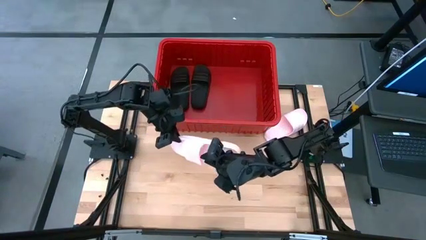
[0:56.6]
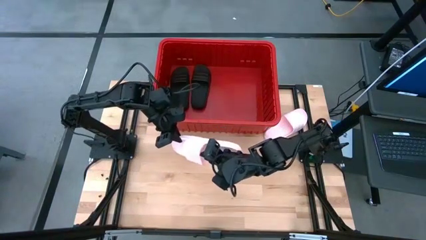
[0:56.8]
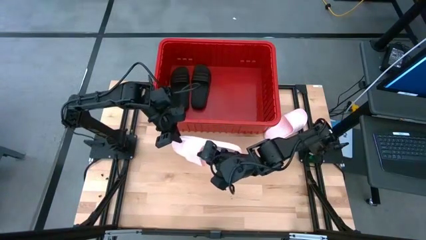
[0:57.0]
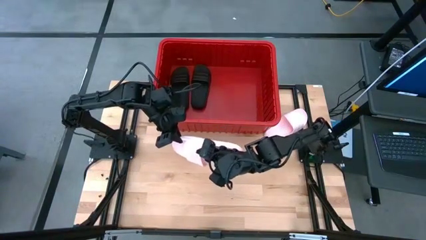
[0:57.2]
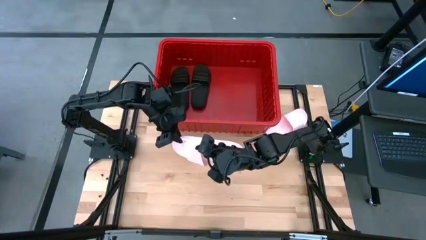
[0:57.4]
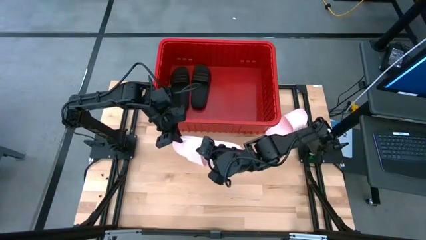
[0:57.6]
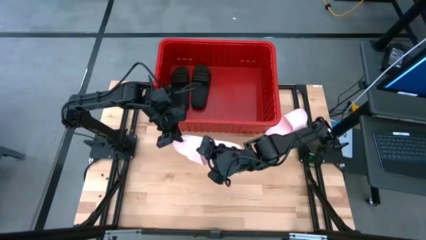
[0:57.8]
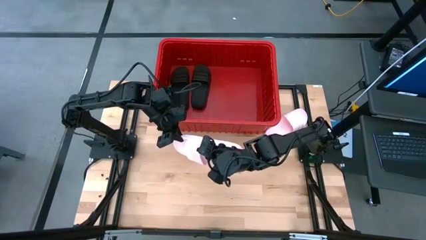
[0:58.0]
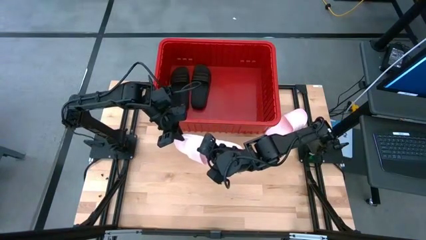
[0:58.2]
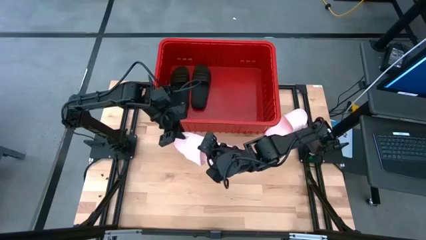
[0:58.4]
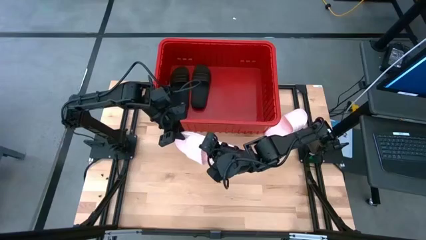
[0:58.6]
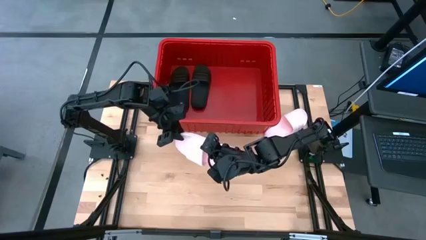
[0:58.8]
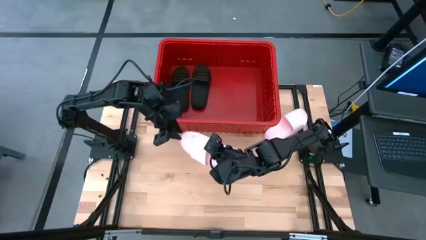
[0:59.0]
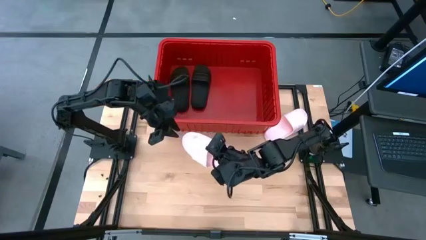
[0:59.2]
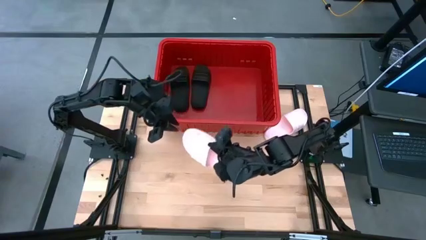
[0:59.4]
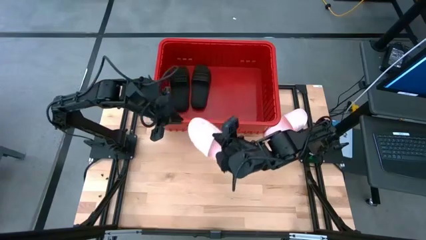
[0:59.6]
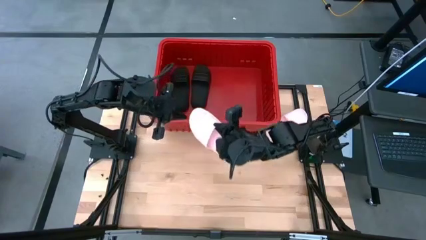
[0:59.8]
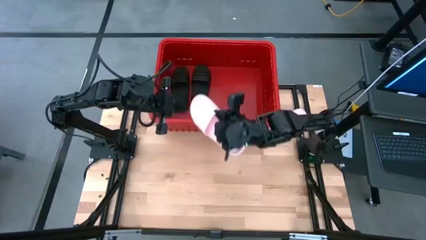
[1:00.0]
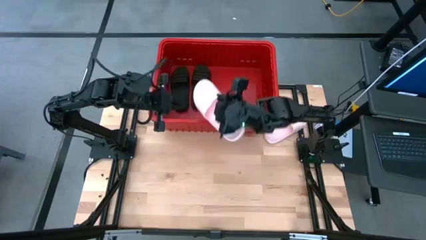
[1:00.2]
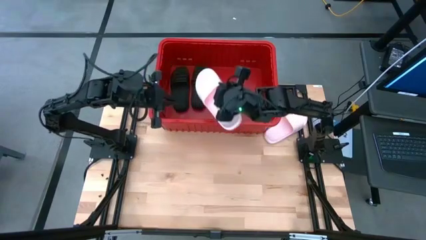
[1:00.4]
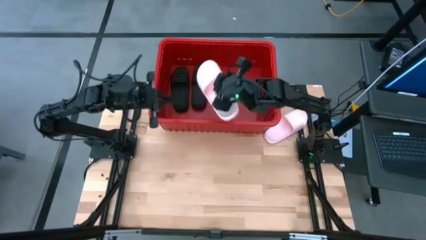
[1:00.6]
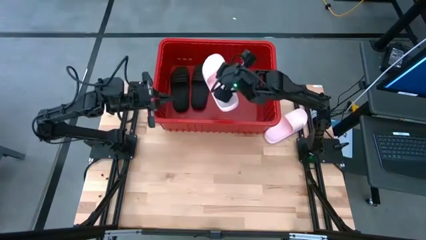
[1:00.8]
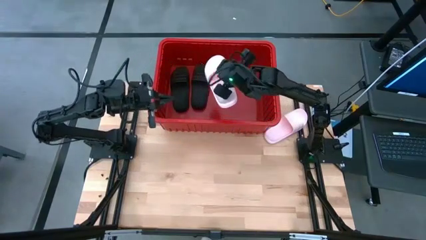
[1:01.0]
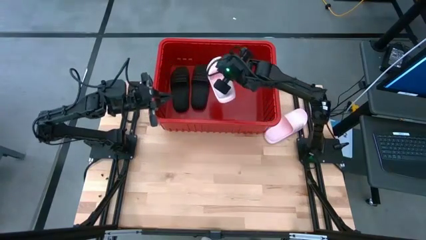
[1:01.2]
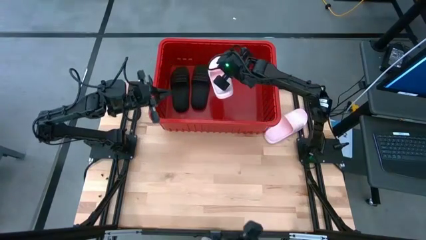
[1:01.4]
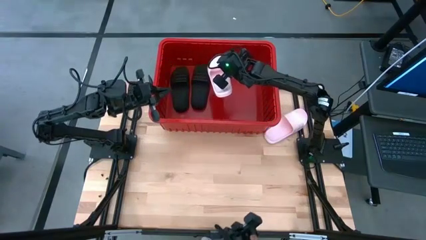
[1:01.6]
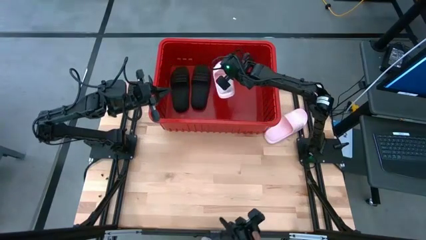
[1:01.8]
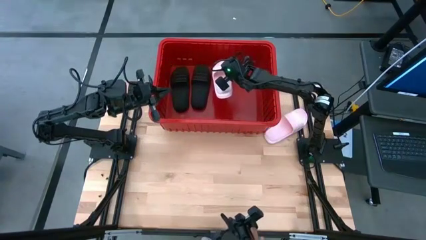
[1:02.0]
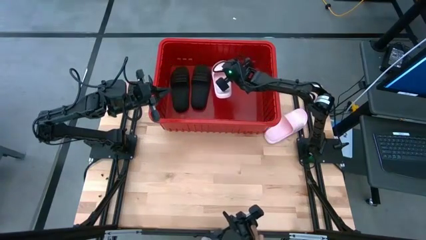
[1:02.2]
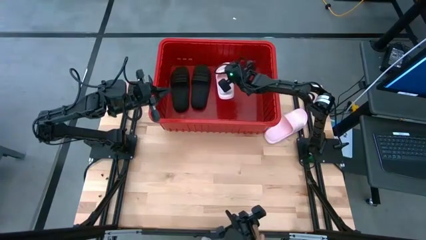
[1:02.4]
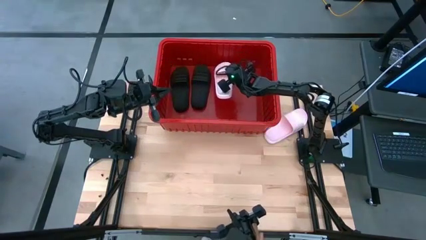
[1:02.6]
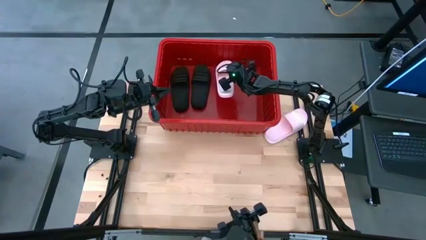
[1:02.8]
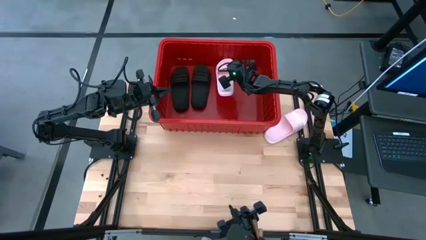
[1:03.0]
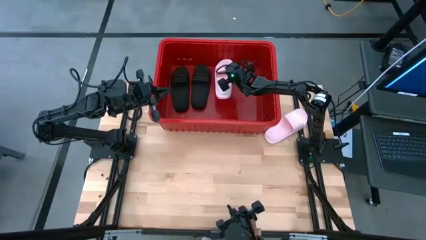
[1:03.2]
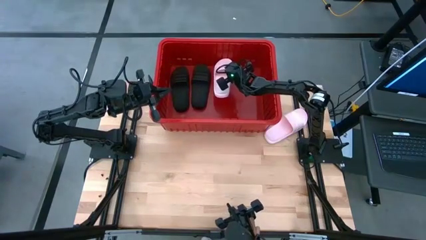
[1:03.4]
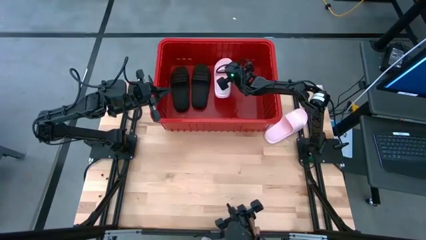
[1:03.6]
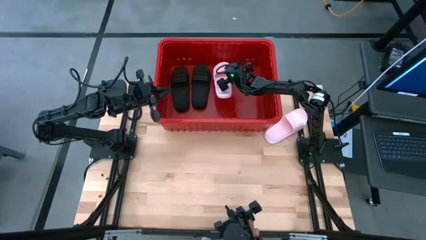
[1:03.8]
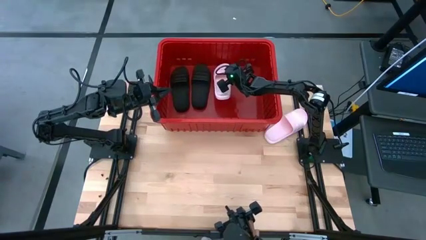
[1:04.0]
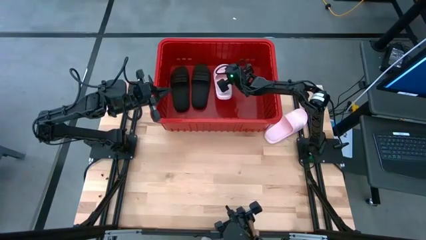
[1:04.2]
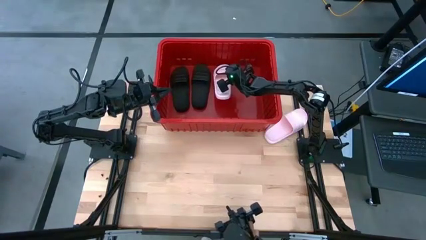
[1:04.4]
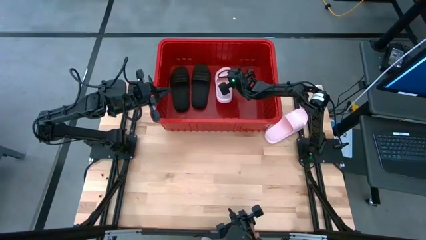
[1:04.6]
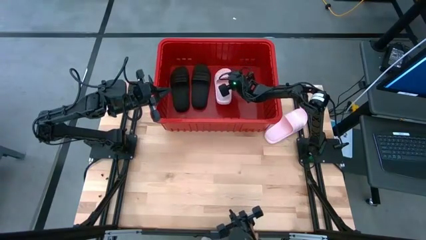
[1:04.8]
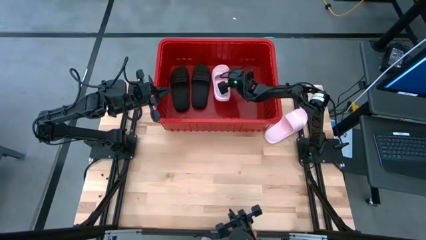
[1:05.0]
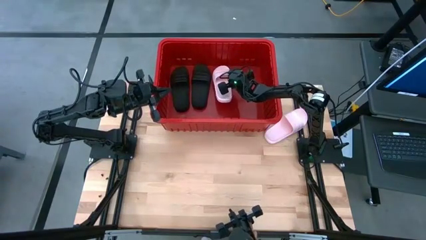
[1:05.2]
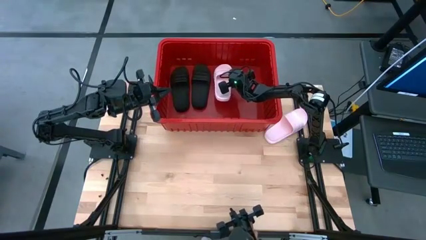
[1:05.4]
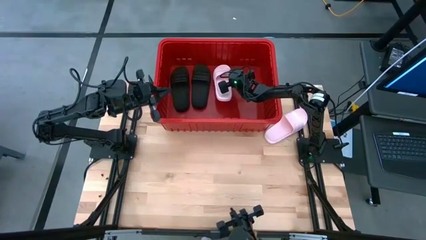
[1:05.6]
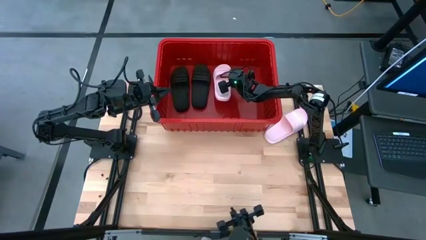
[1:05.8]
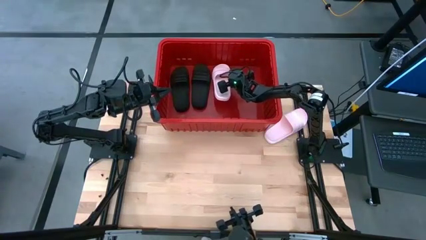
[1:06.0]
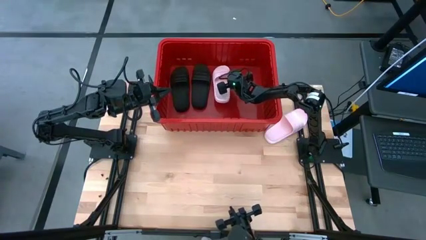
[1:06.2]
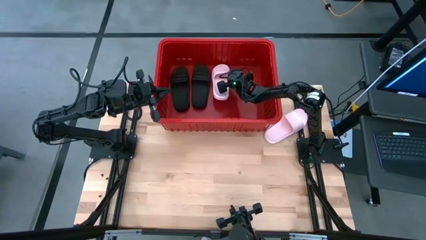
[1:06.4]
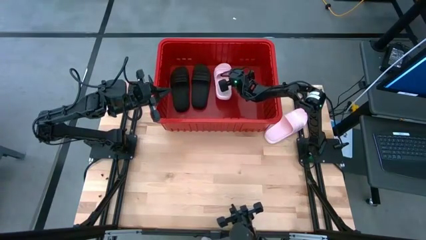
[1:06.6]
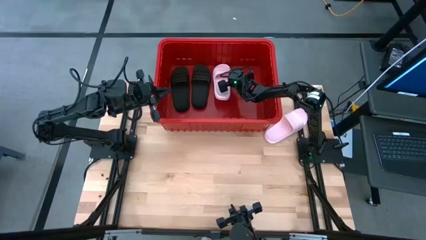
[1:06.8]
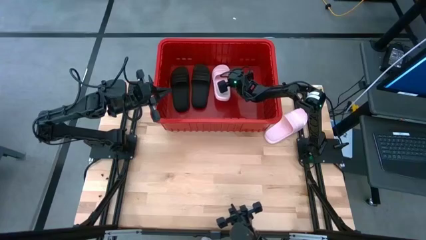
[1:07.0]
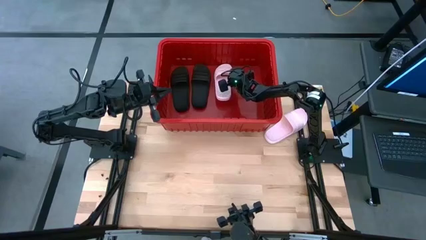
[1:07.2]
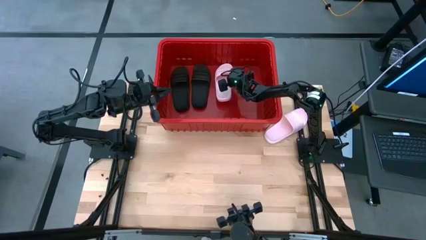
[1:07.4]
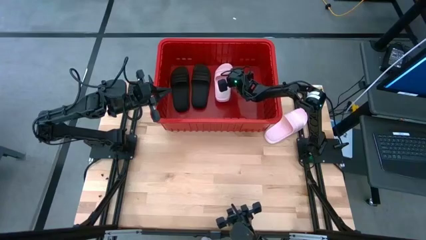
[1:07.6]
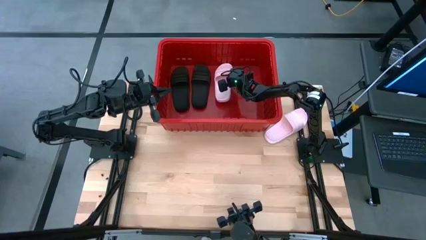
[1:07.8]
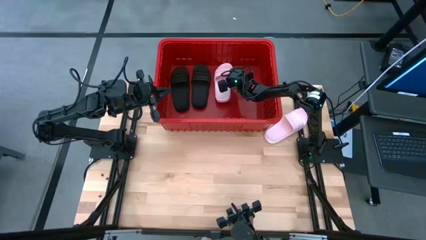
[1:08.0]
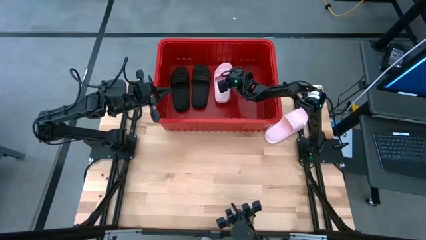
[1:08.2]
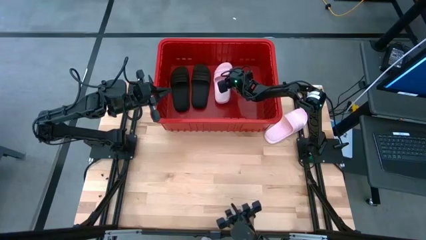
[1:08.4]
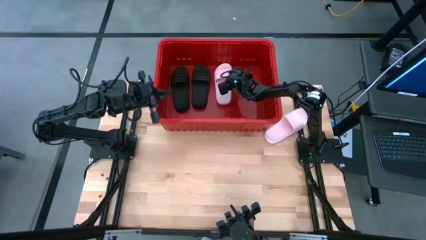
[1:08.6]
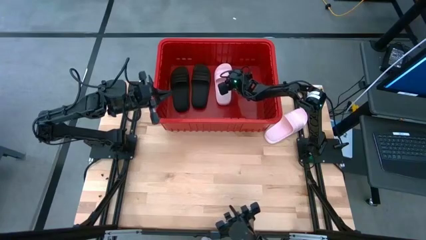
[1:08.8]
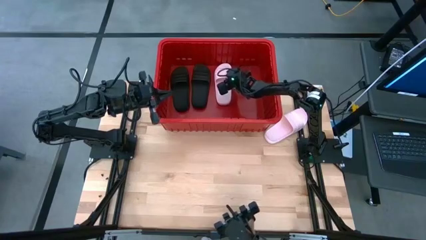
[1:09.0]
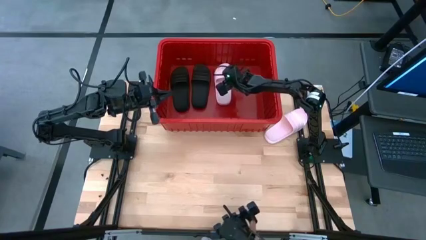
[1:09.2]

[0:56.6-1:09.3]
Task: Pick and place slides into bin
Put the pink slide into the red bin
